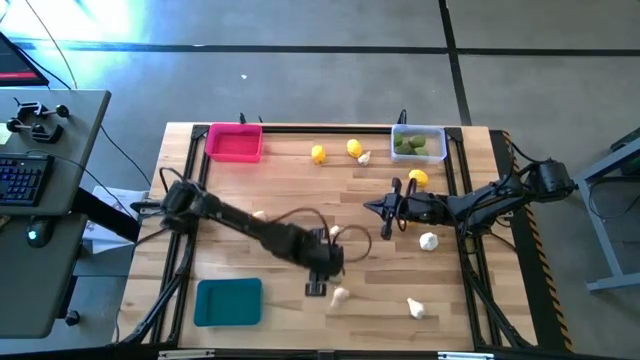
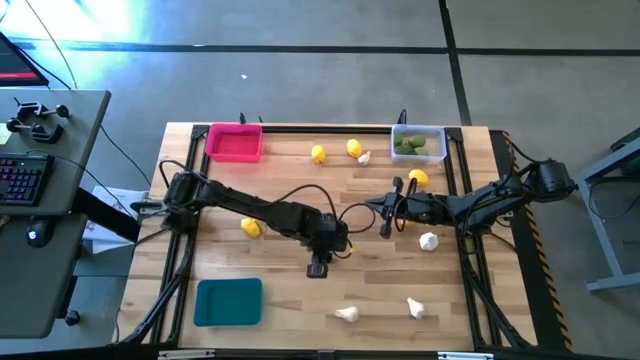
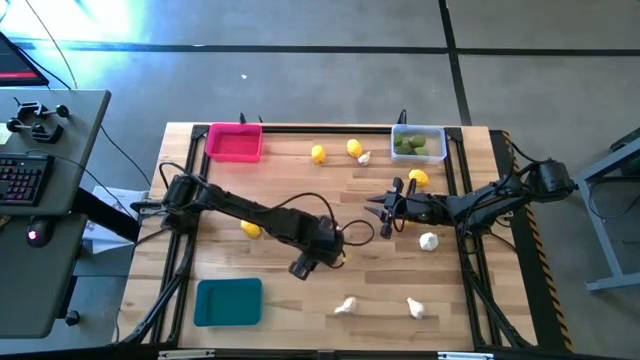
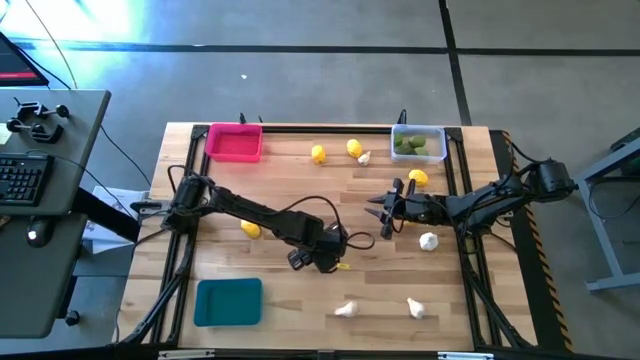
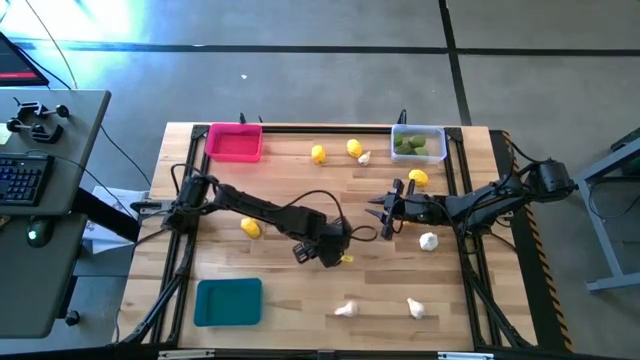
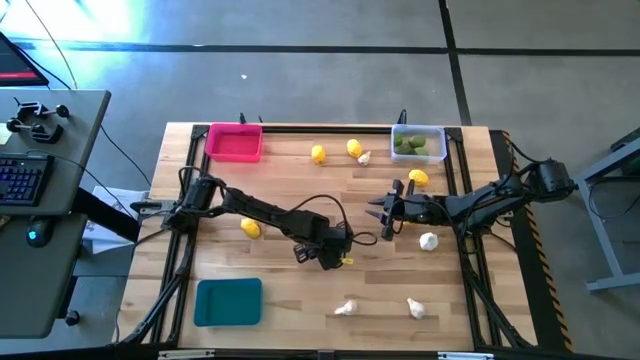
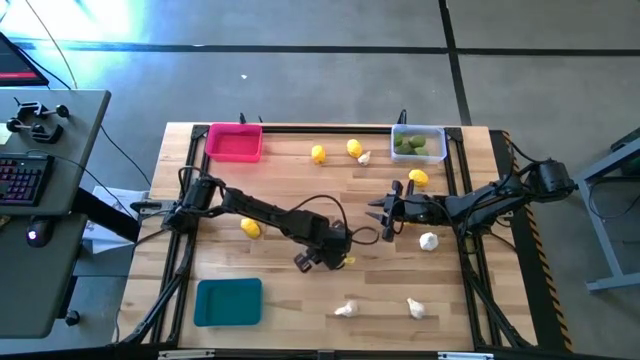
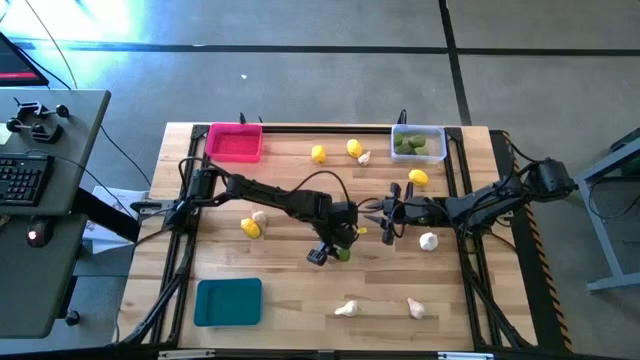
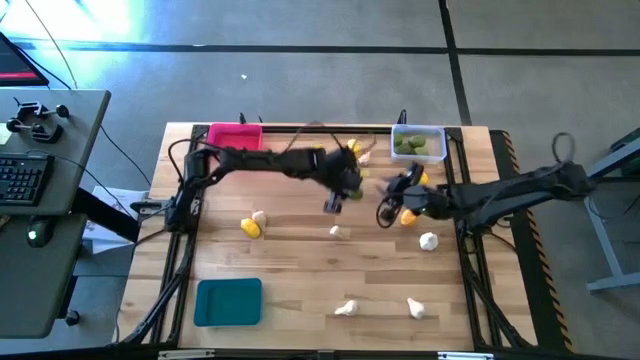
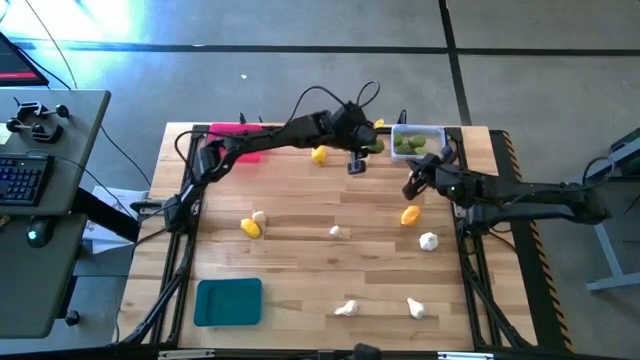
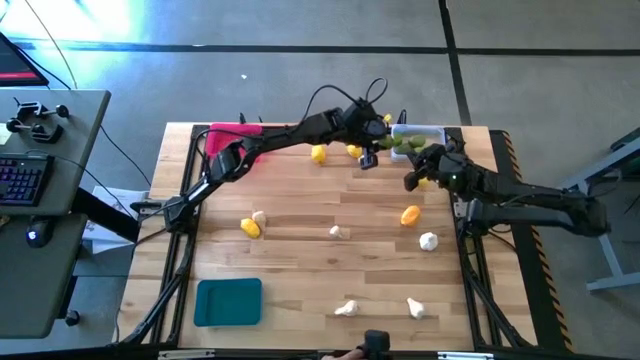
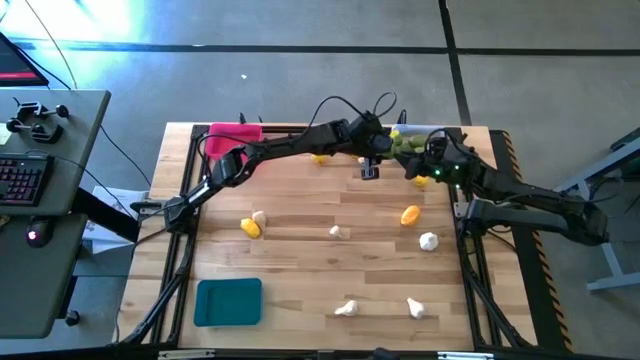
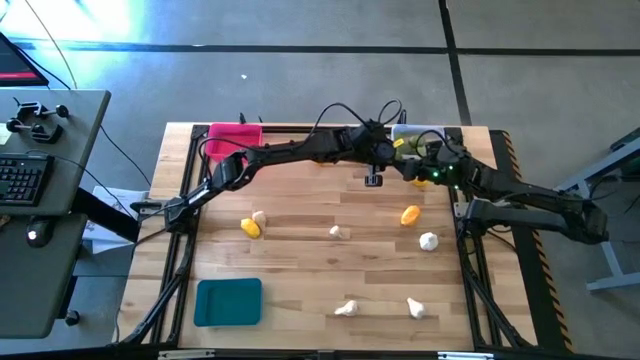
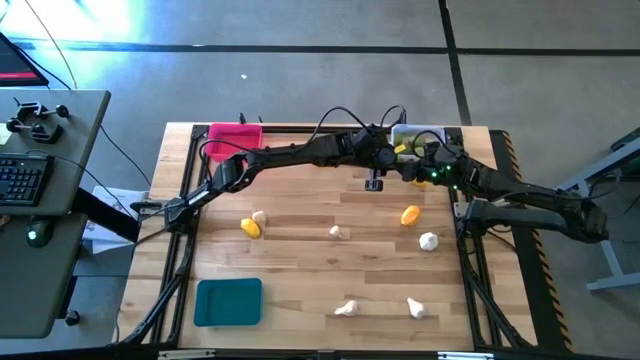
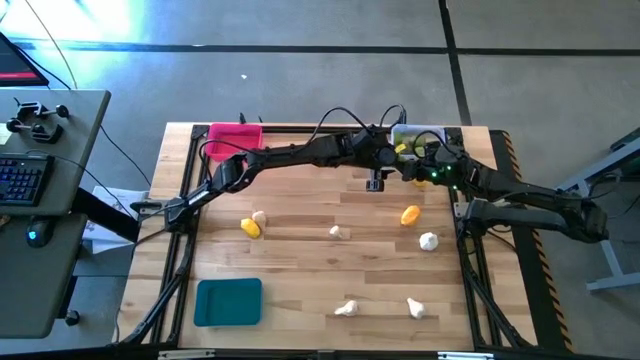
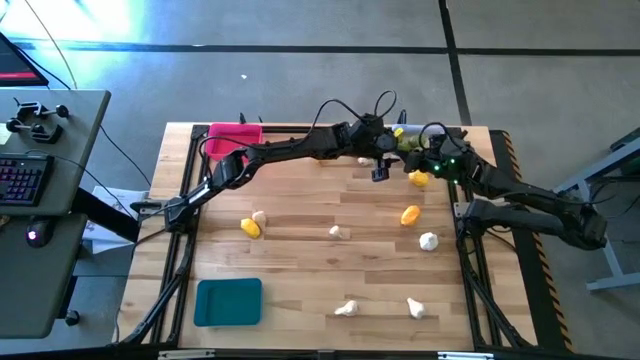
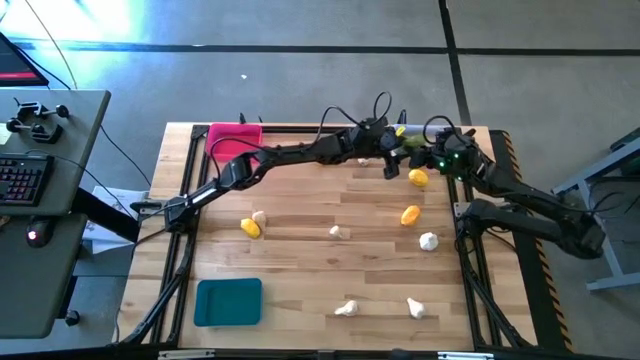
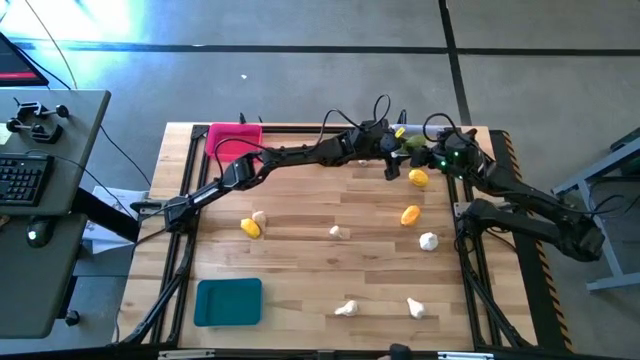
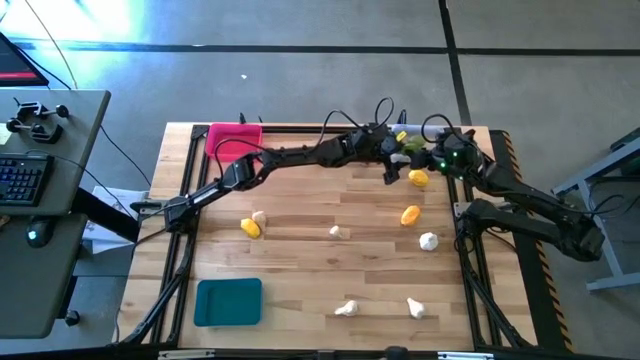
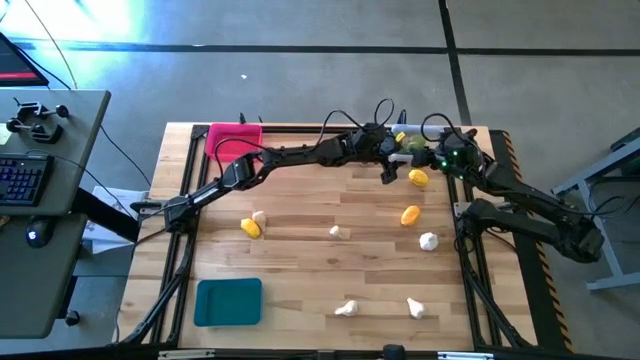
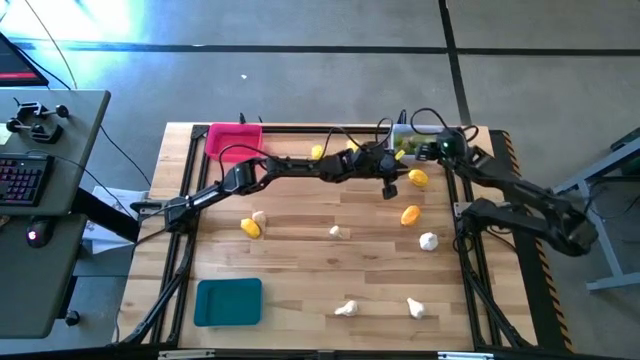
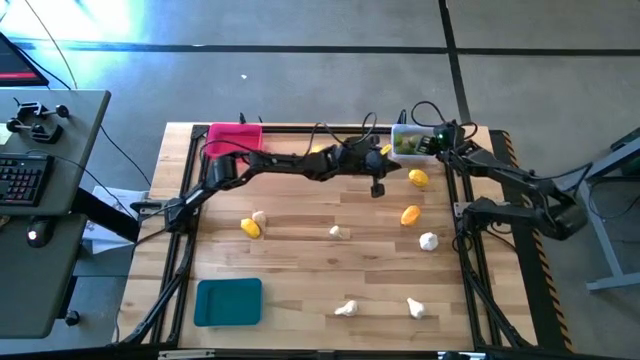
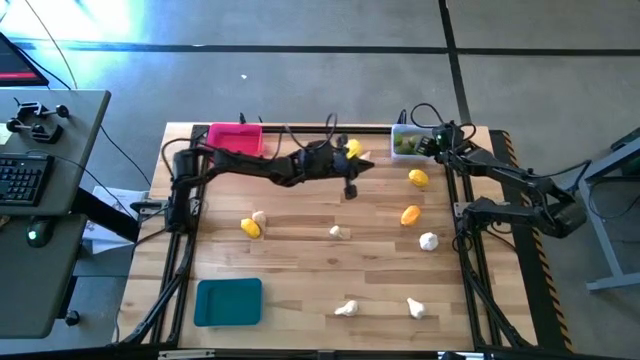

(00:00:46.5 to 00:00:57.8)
Task: Sort produce into baskets
Put the lime into the transparent bin

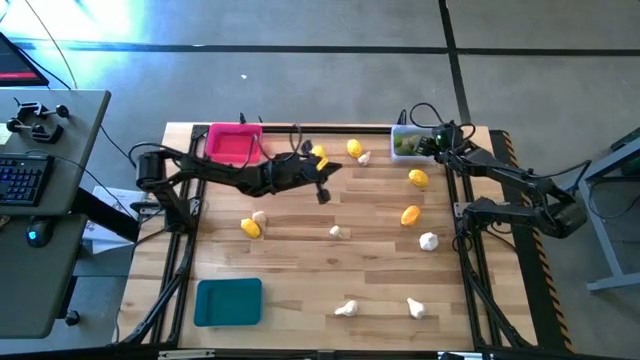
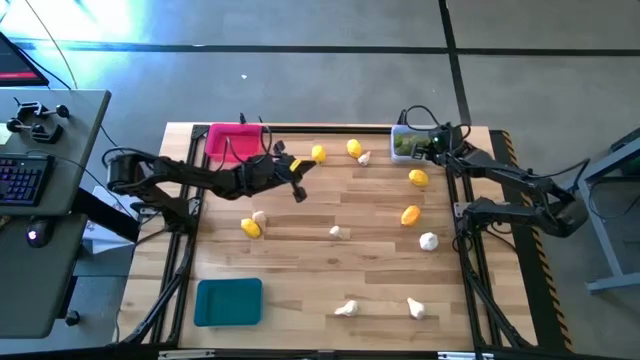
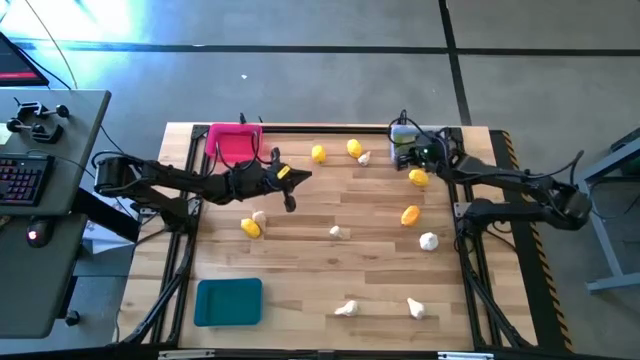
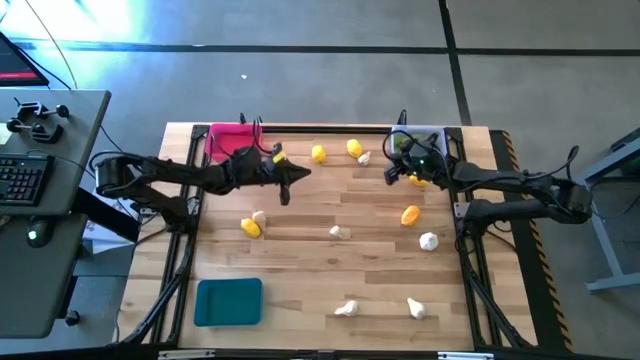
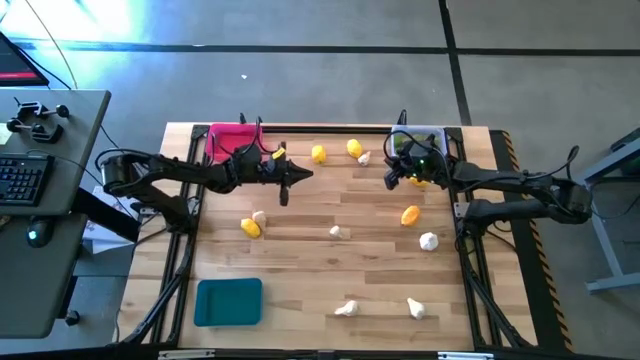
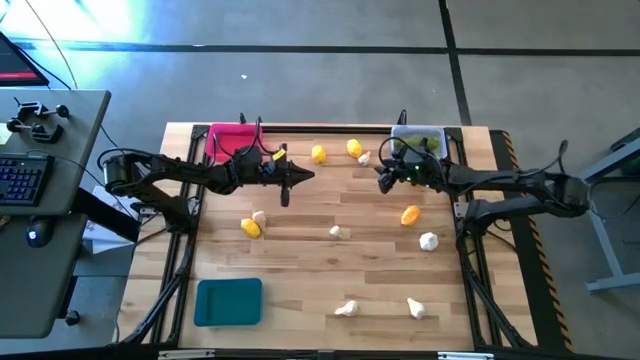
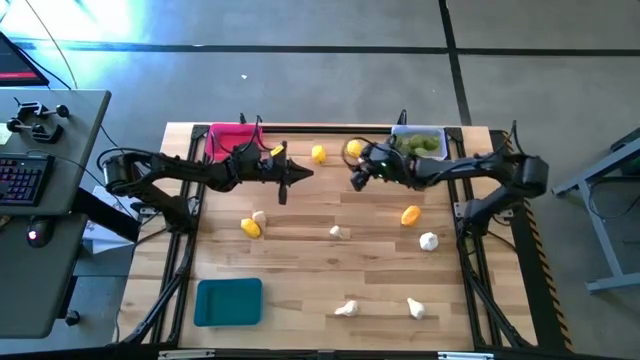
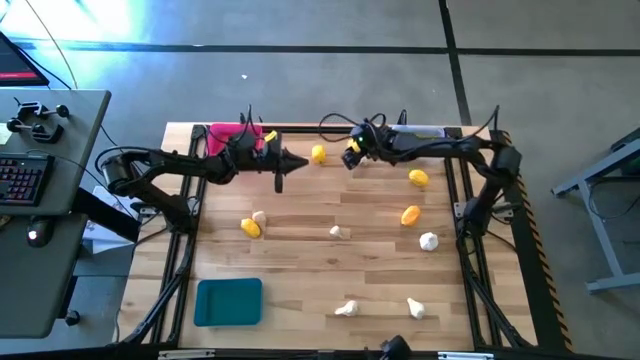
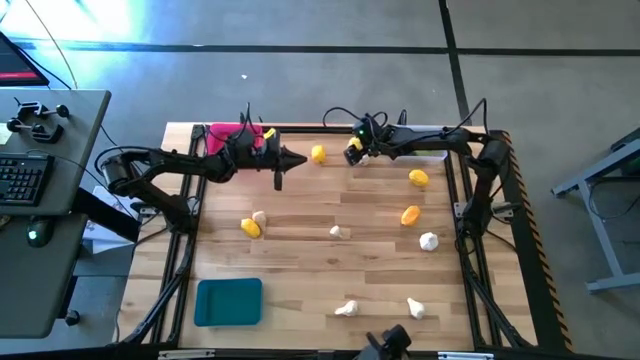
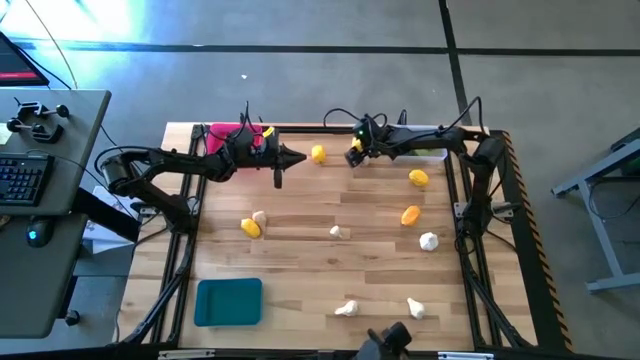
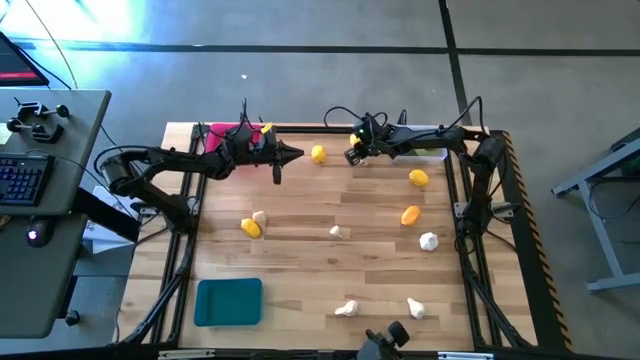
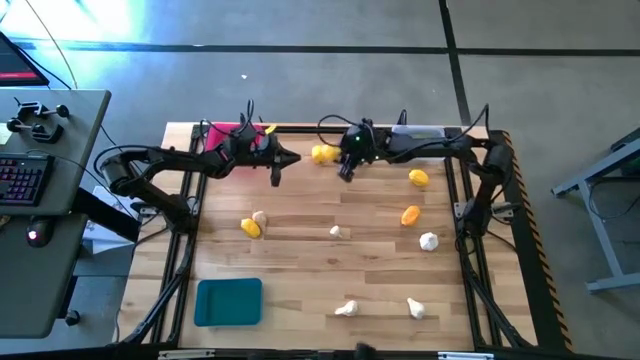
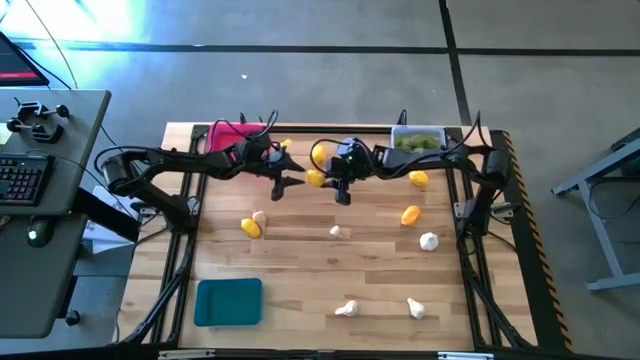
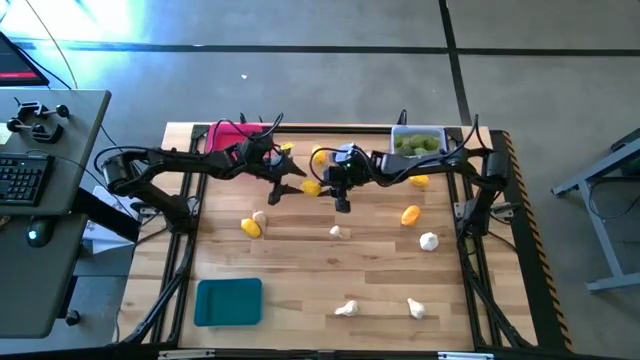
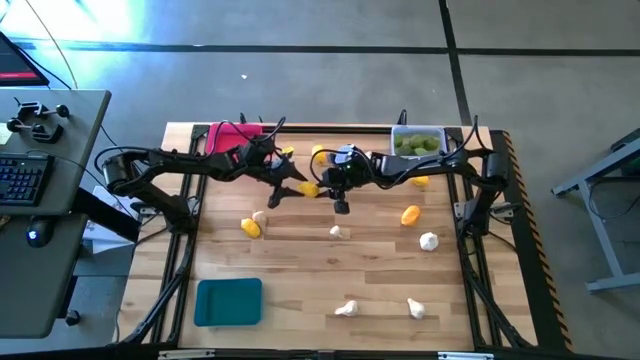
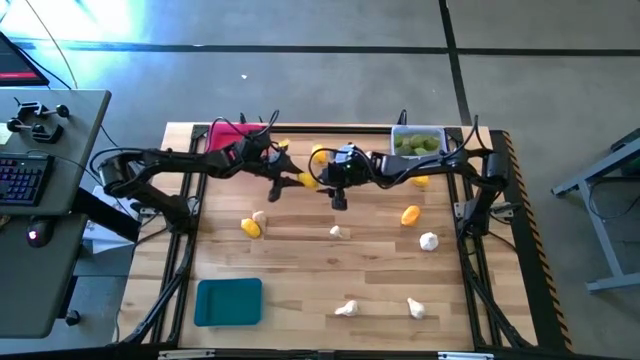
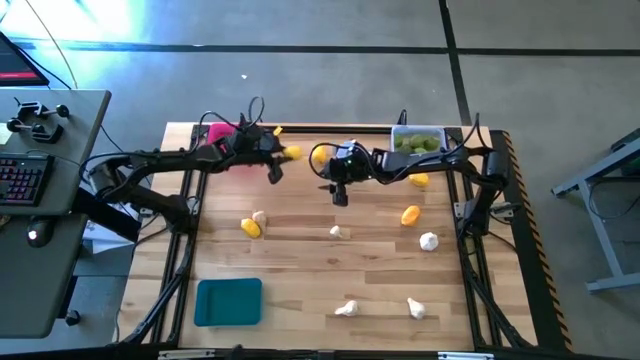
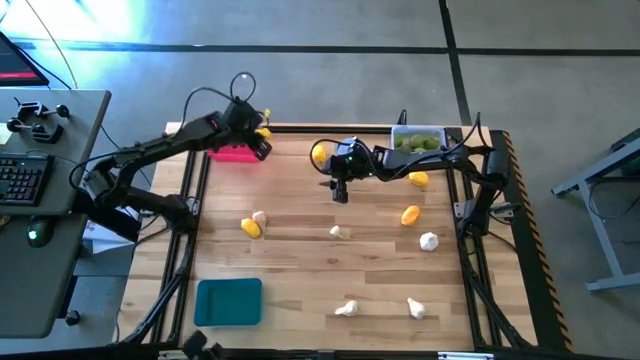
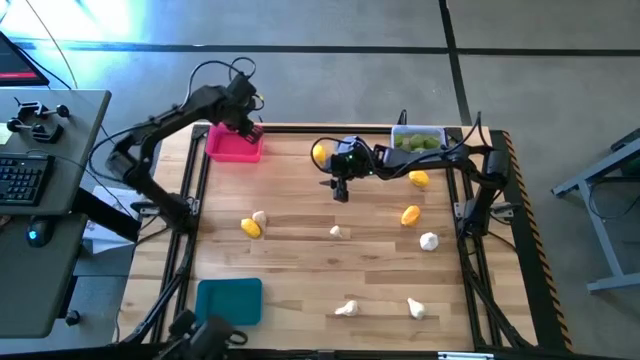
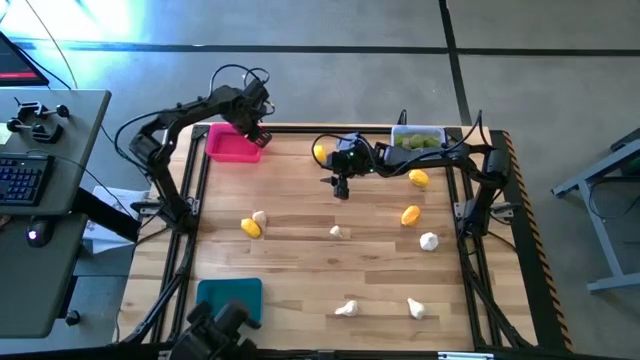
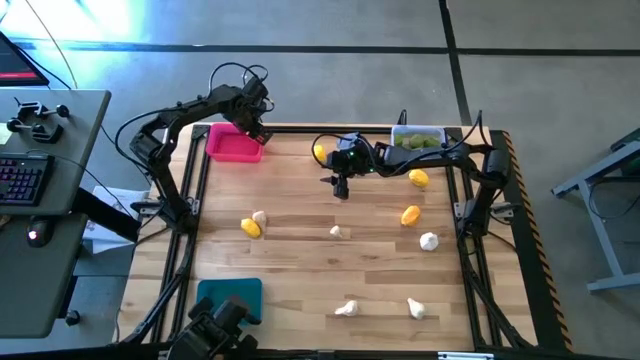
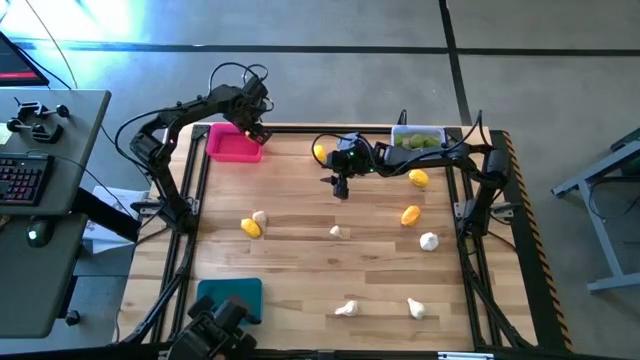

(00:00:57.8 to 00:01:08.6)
Put the top center lemon into the pink bin
